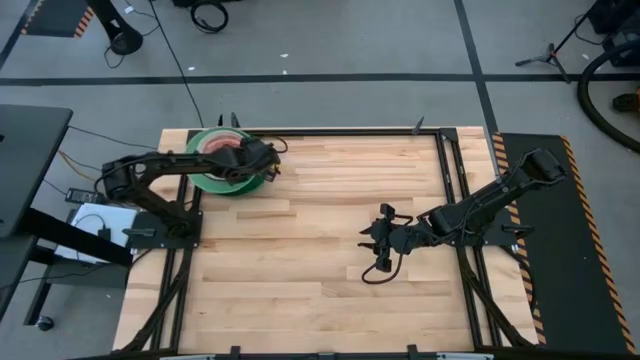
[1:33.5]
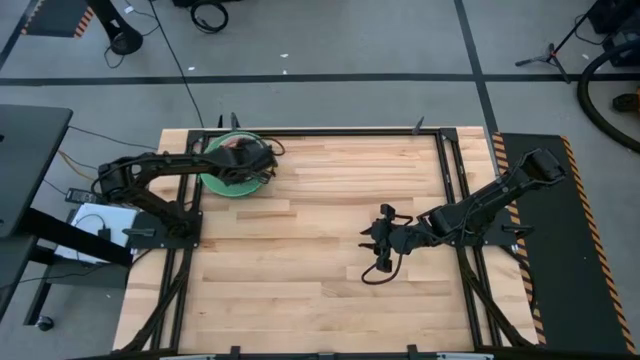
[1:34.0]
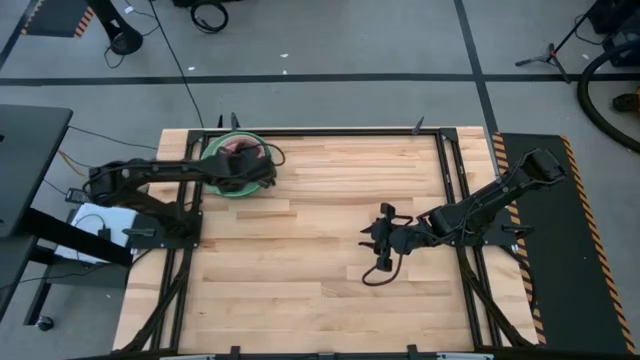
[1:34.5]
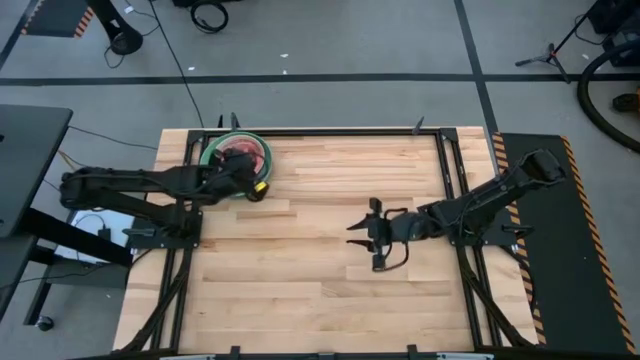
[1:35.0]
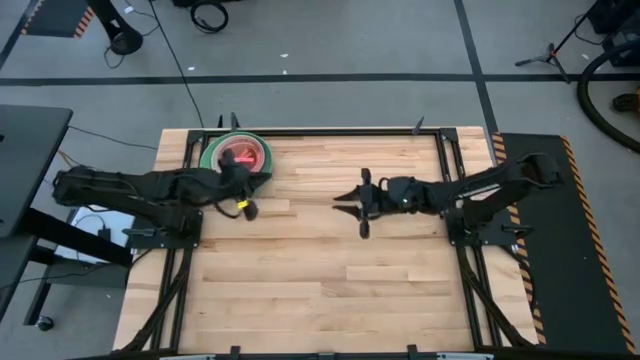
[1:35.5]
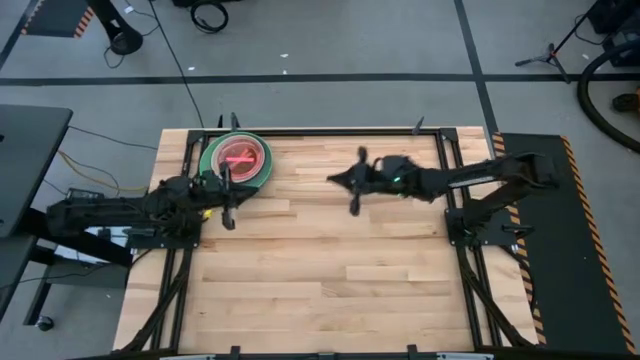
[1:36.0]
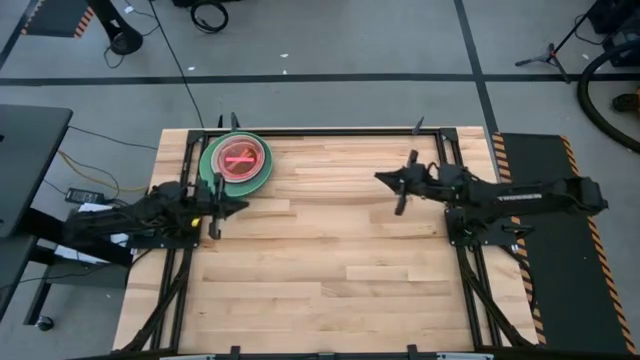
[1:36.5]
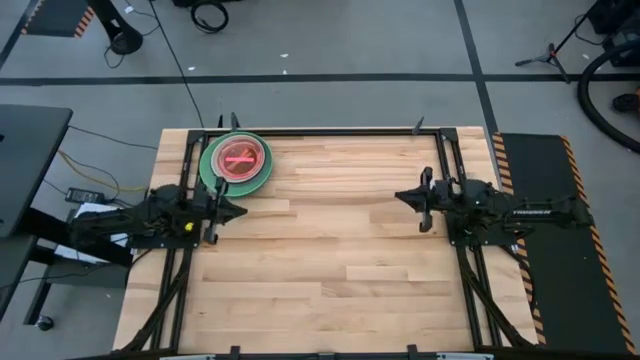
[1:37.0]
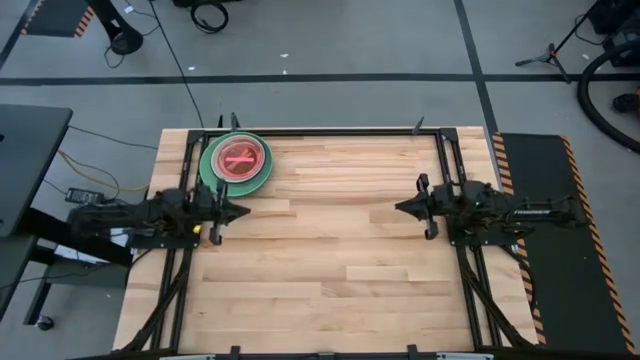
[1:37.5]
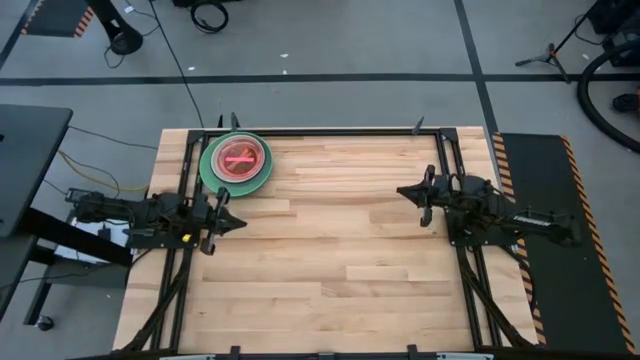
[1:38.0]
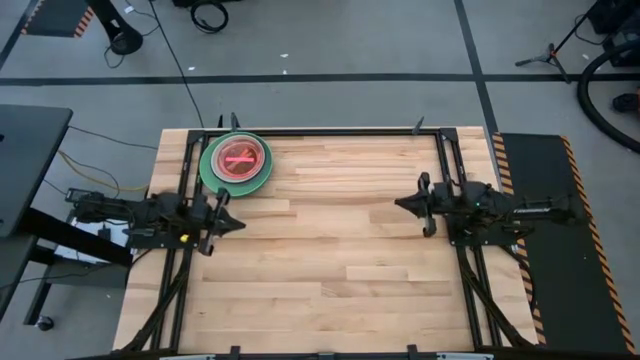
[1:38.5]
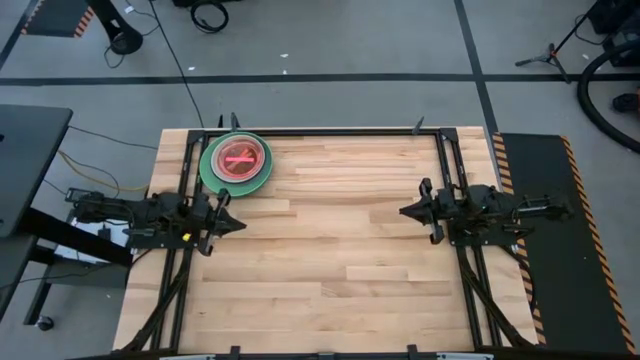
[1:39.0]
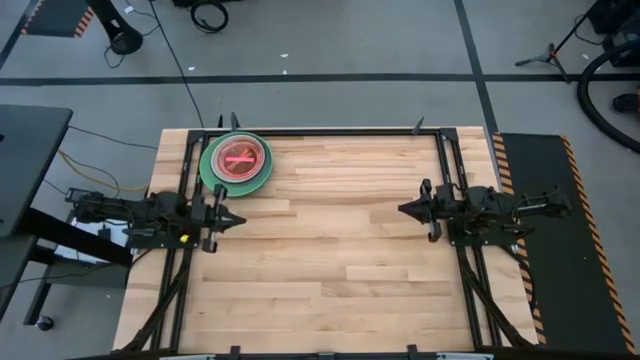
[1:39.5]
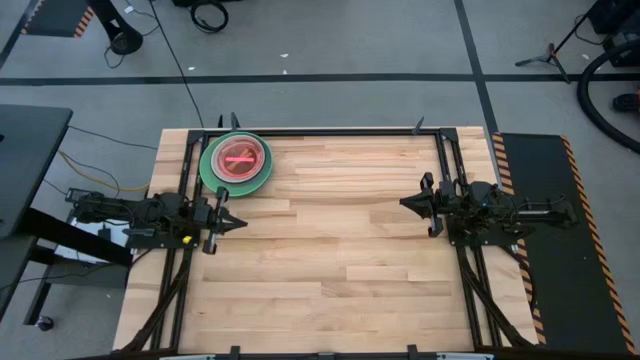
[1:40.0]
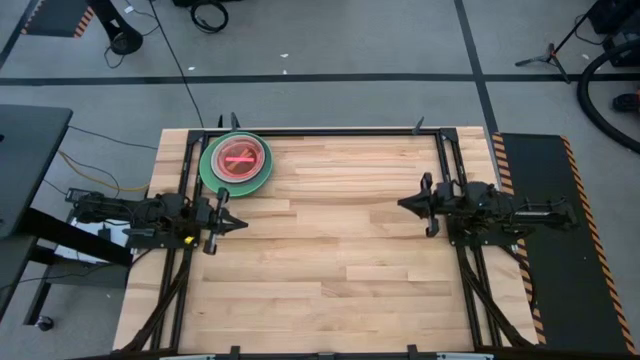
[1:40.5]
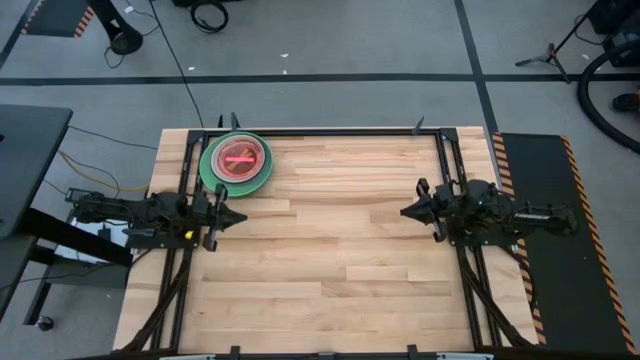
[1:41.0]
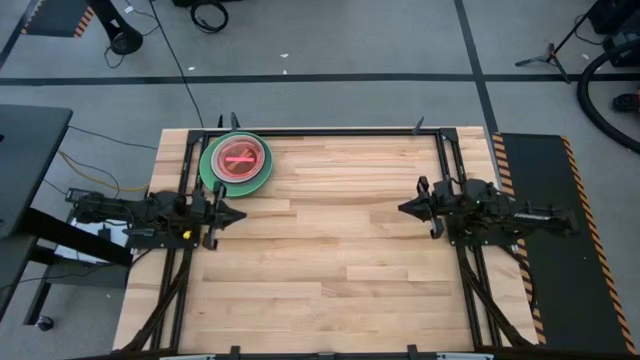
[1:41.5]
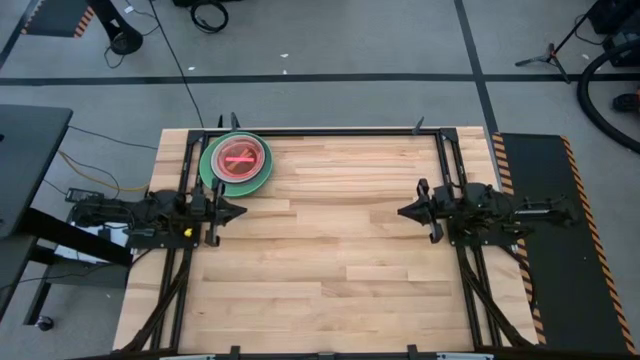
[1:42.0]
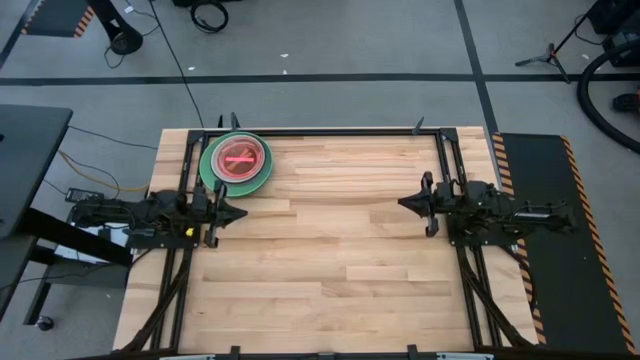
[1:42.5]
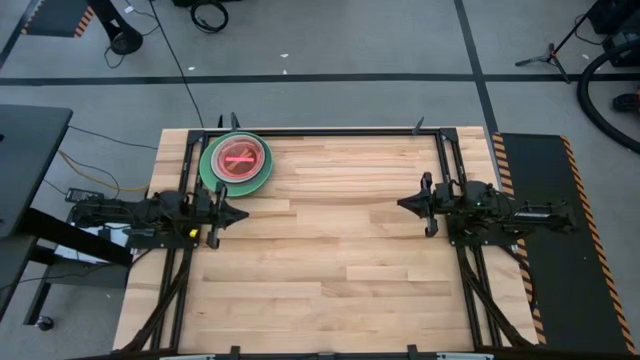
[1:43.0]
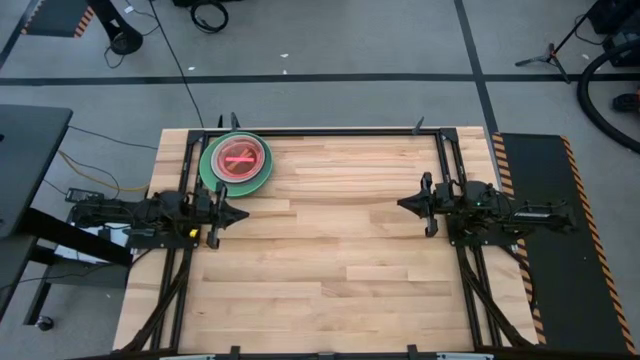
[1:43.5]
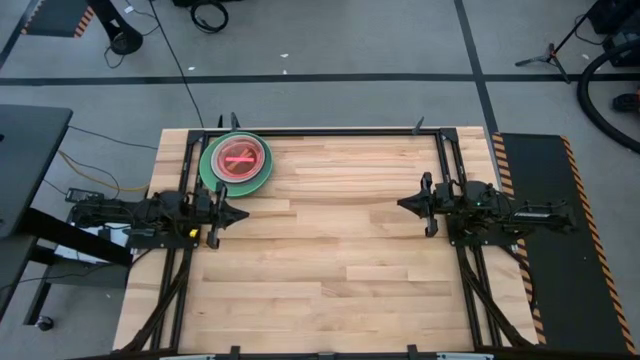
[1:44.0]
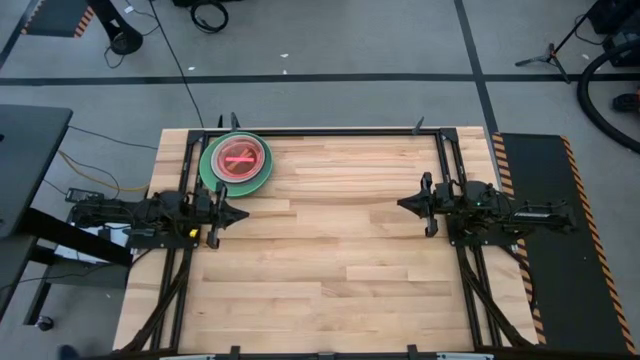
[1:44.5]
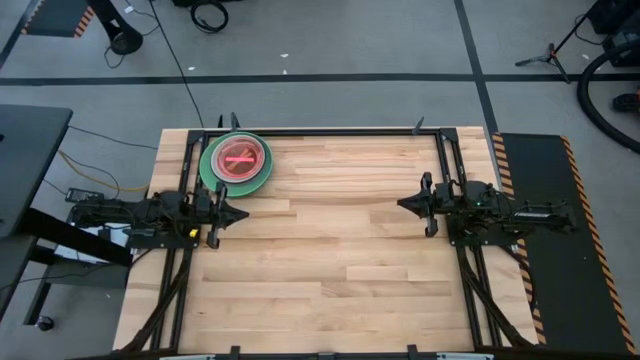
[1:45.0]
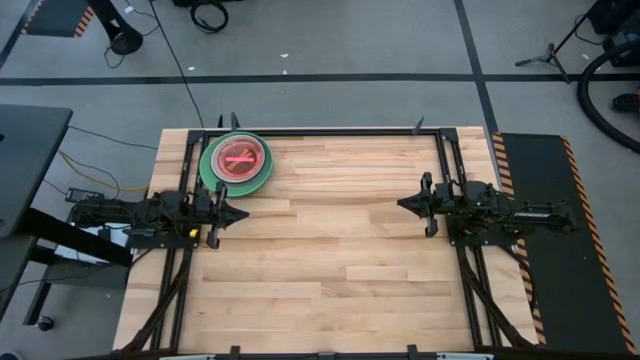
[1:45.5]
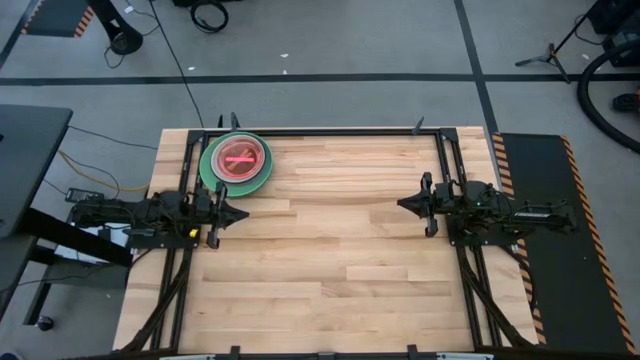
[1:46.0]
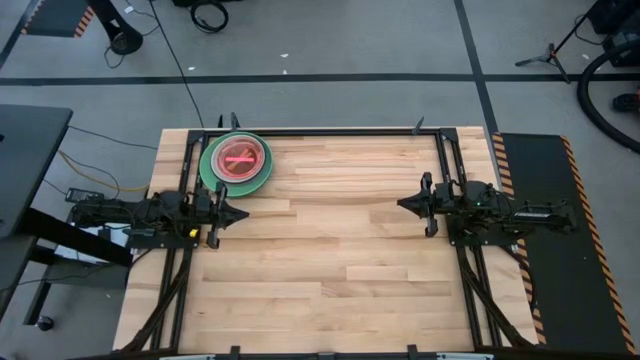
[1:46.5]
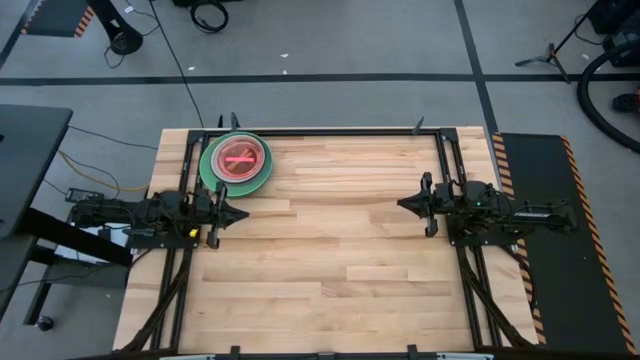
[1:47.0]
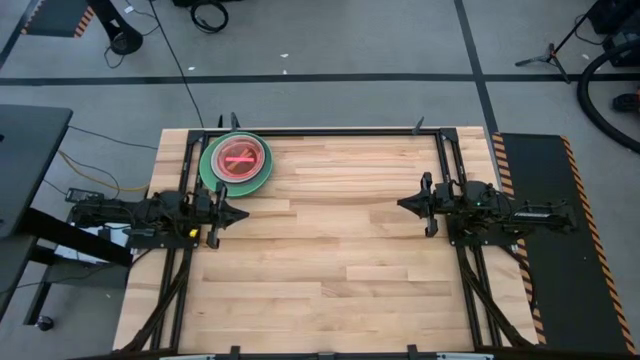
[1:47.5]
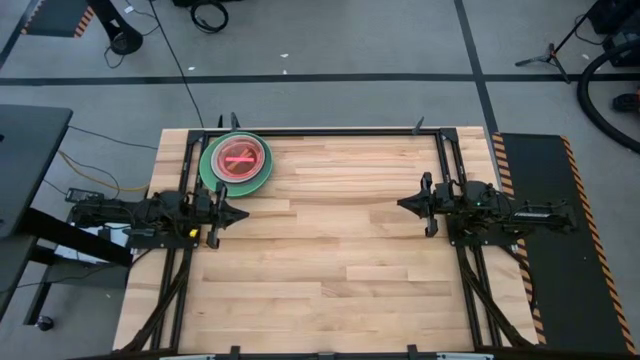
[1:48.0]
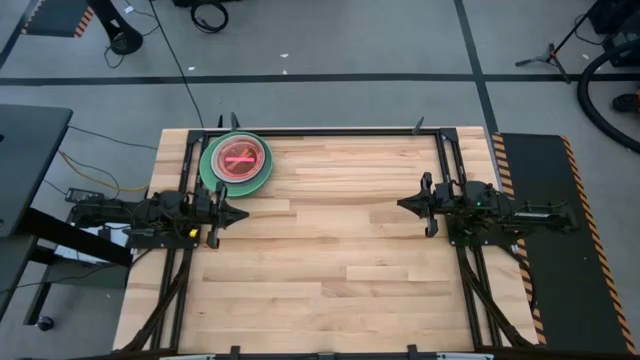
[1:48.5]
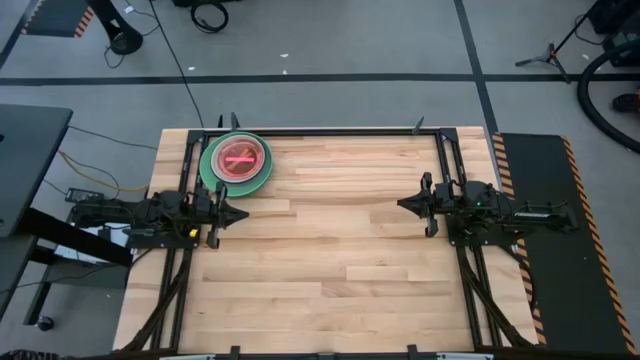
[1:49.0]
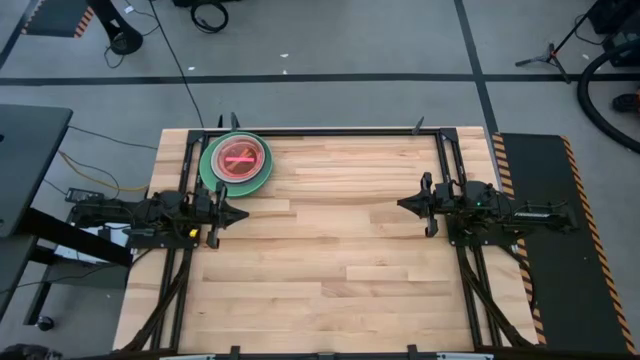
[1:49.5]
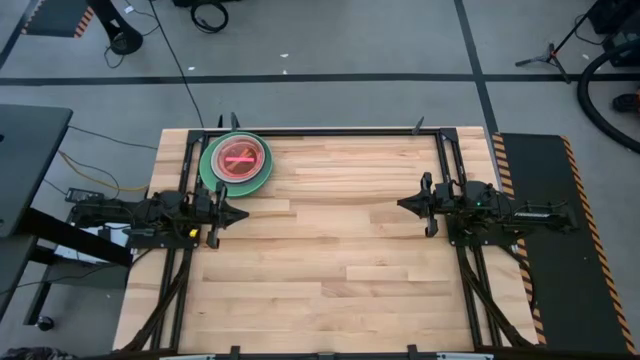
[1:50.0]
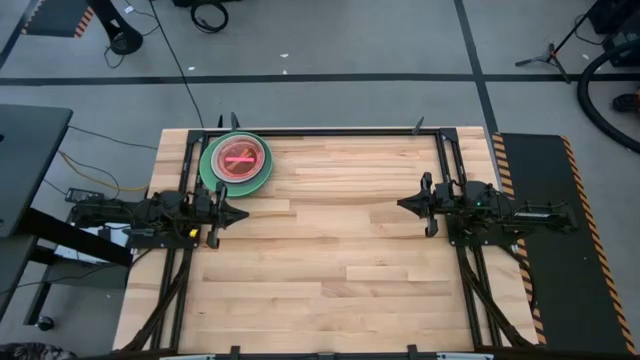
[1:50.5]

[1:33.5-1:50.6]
Task: Stack plastic plates
Return to Home Position

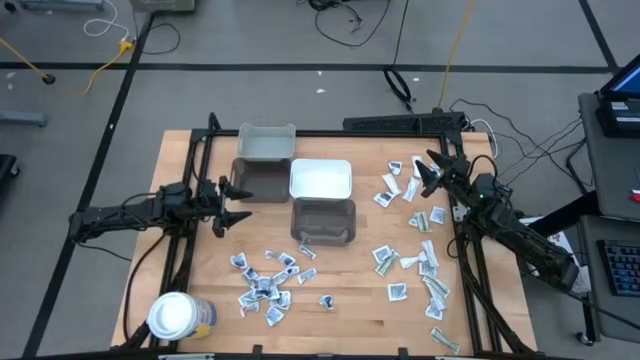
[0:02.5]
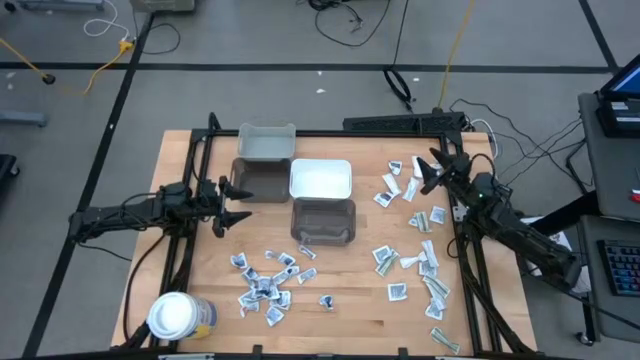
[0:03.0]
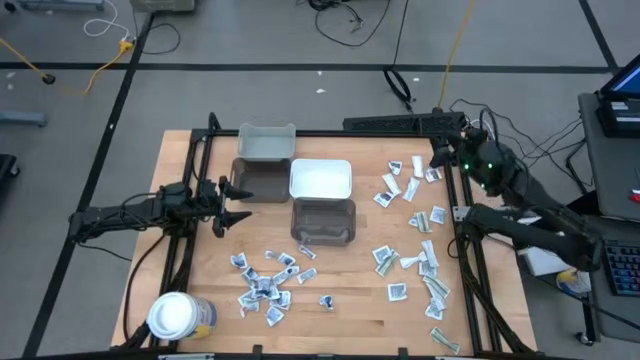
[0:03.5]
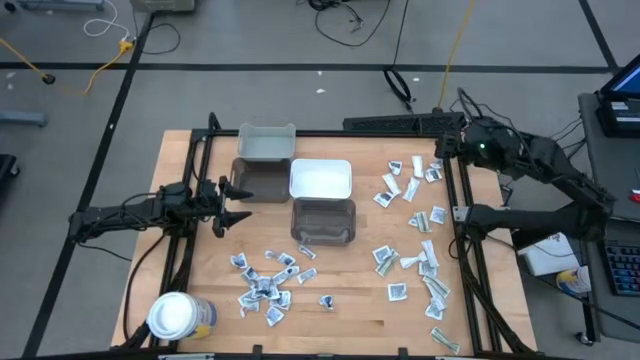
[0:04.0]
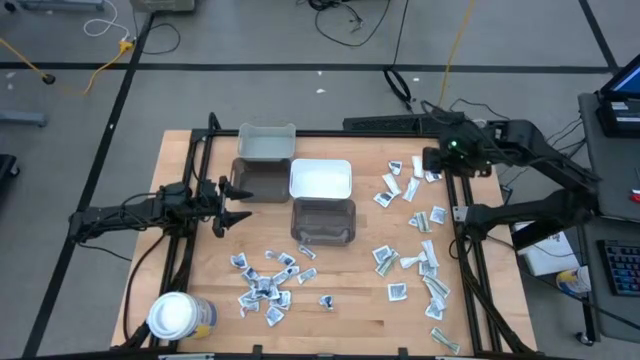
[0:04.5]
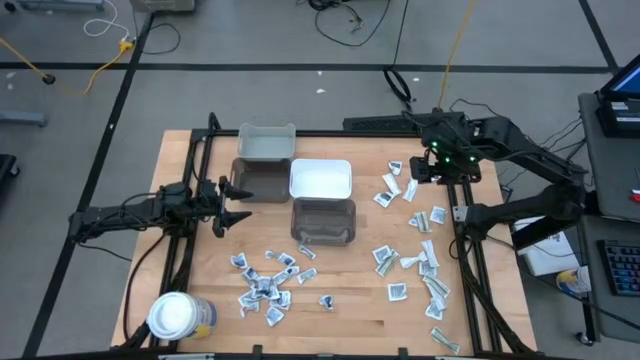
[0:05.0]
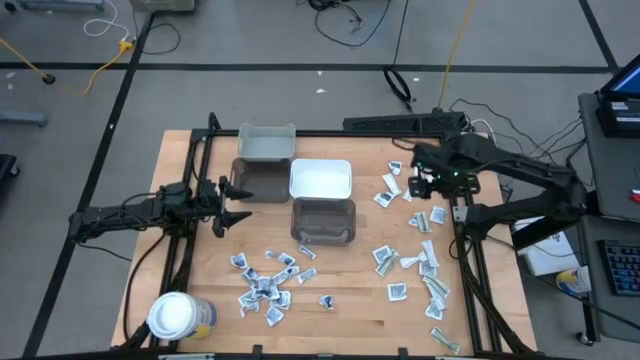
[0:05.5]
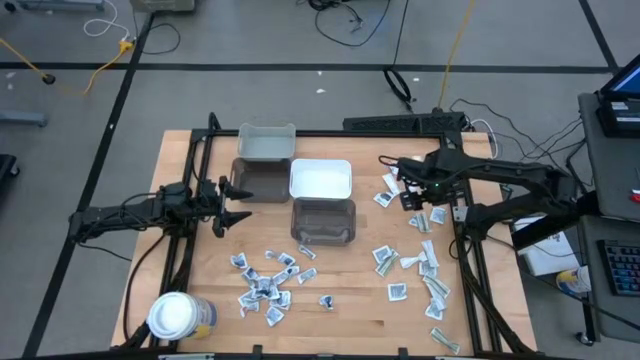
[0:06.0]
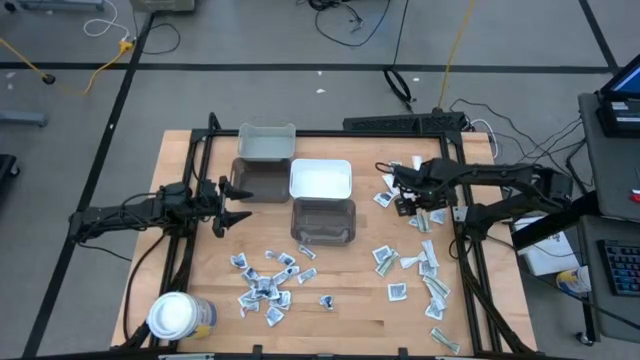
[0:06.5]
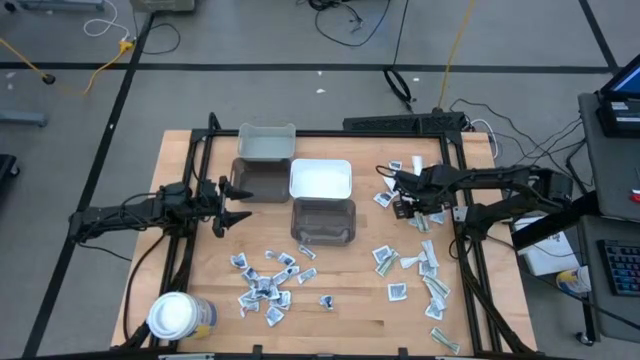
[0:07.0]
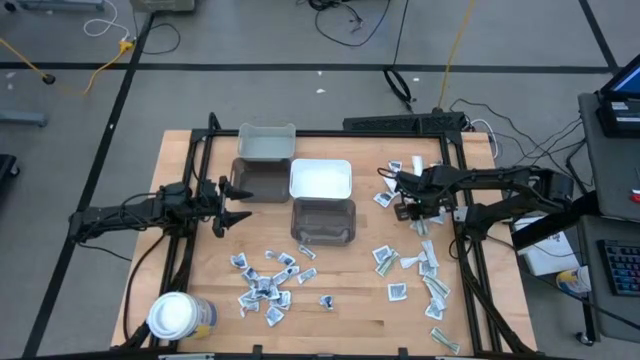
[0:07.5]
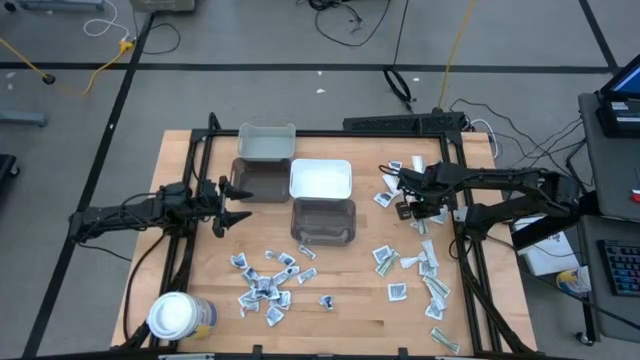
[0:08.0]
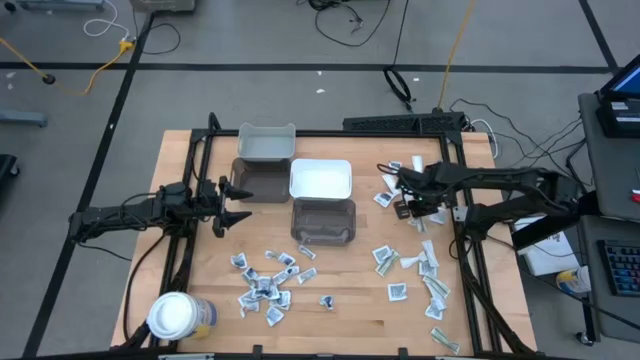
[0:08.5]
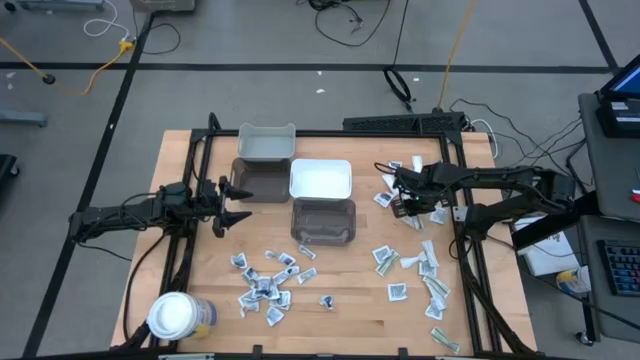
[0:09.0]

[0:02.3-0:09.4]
Task: Pick & Place First Aid Supplies
Put the green bandage pack into the right black bin
